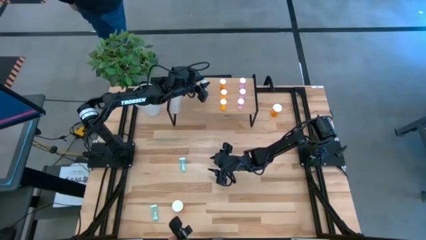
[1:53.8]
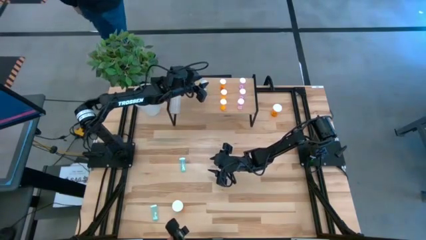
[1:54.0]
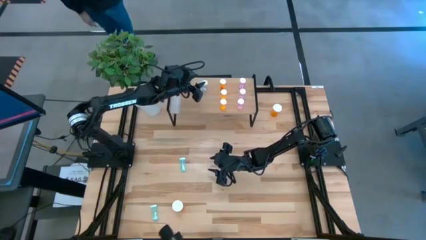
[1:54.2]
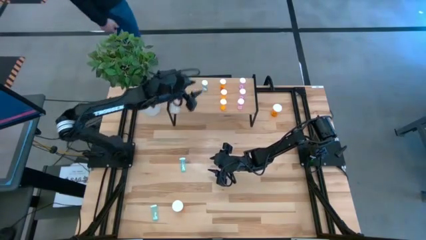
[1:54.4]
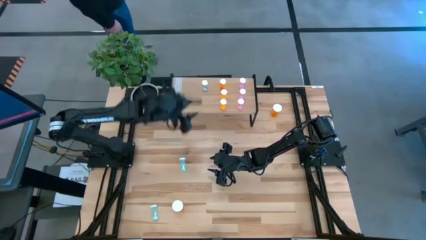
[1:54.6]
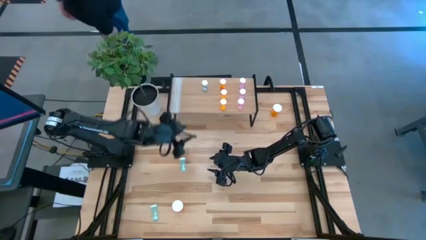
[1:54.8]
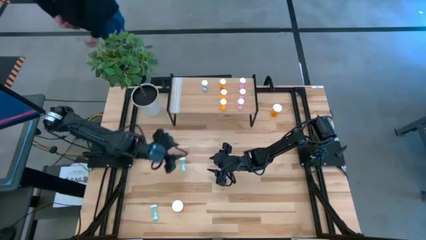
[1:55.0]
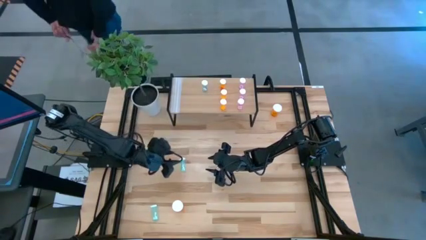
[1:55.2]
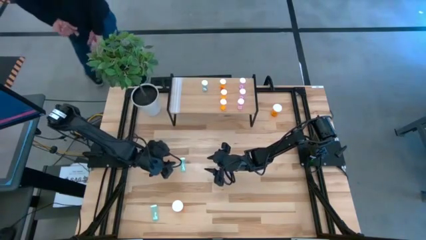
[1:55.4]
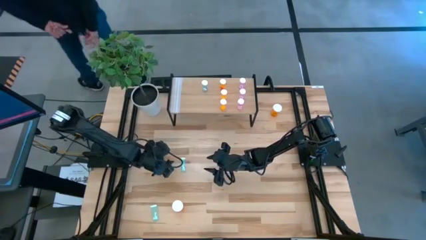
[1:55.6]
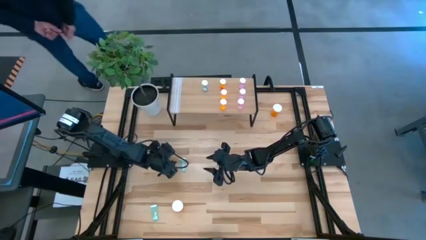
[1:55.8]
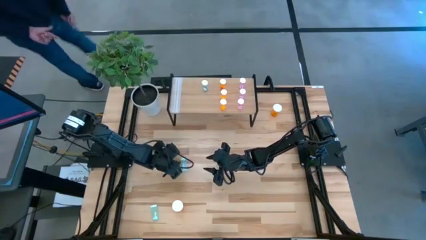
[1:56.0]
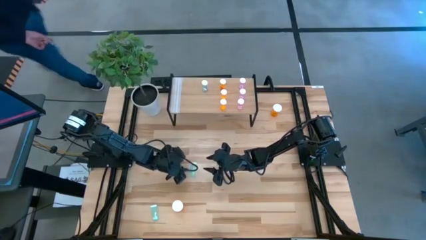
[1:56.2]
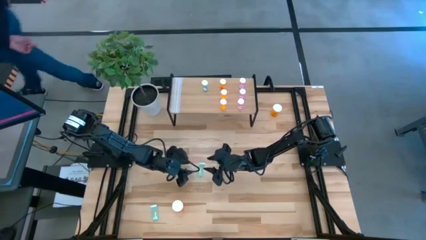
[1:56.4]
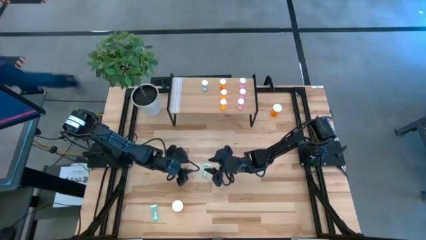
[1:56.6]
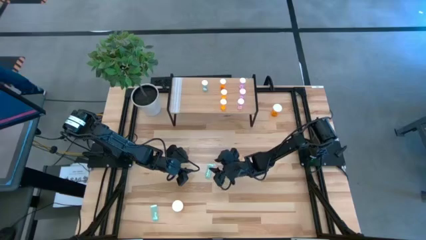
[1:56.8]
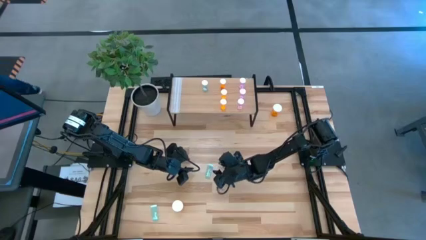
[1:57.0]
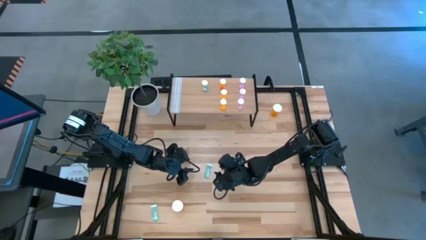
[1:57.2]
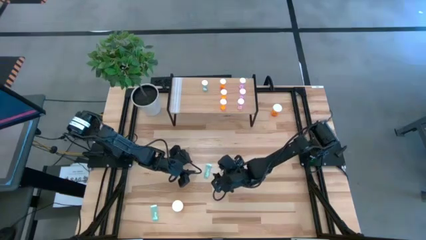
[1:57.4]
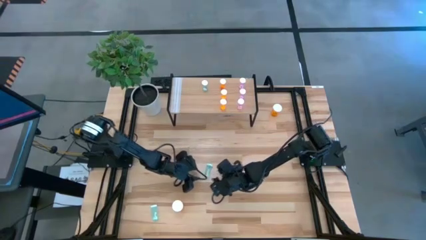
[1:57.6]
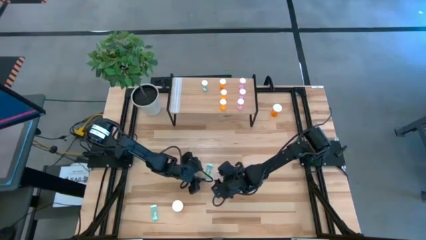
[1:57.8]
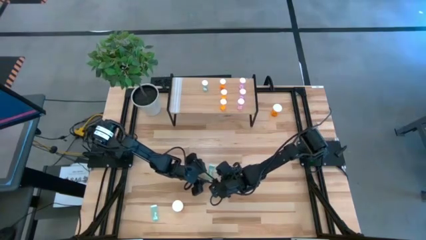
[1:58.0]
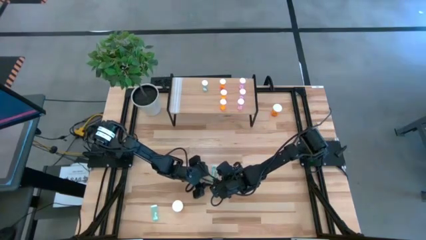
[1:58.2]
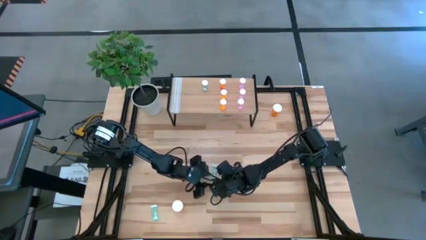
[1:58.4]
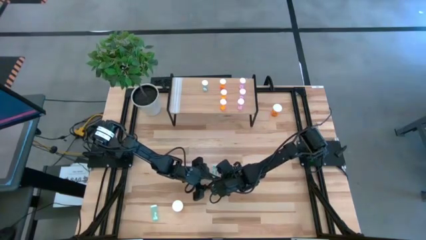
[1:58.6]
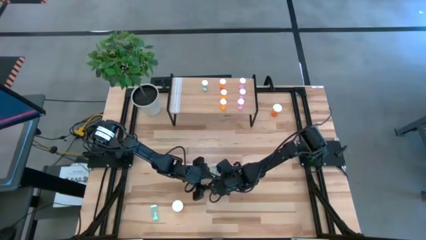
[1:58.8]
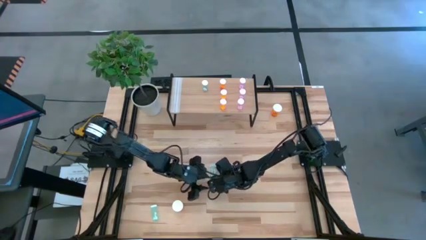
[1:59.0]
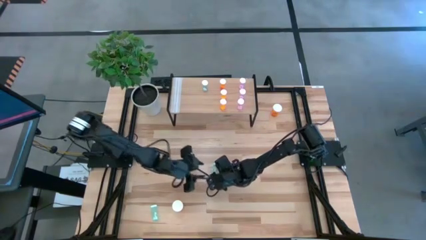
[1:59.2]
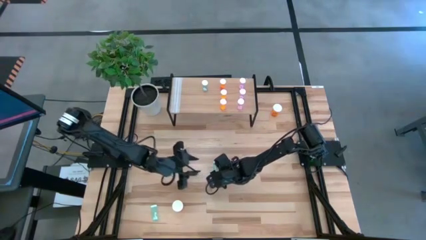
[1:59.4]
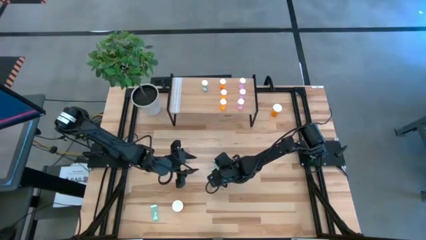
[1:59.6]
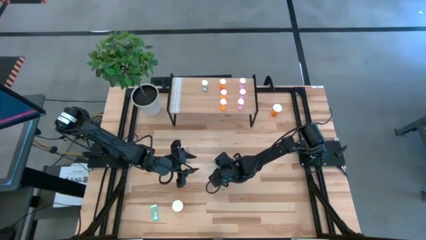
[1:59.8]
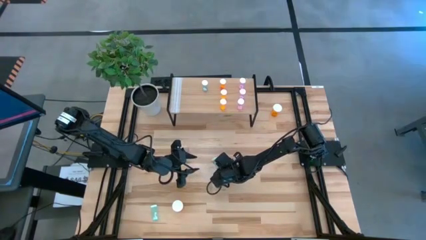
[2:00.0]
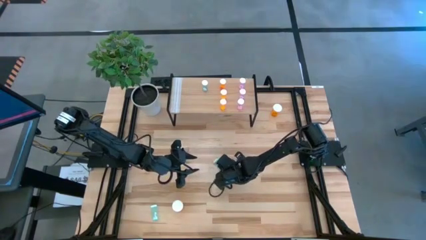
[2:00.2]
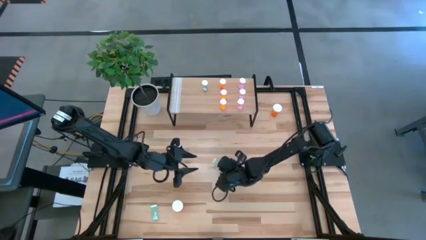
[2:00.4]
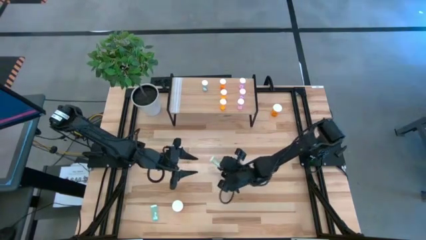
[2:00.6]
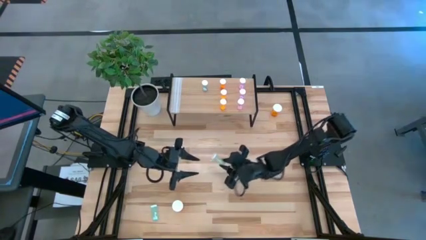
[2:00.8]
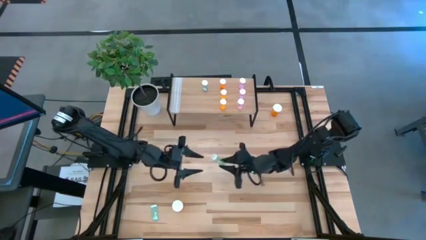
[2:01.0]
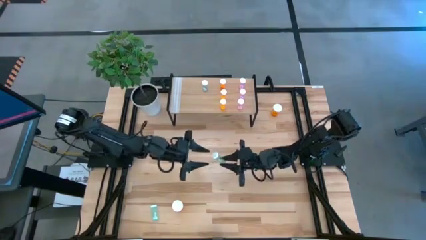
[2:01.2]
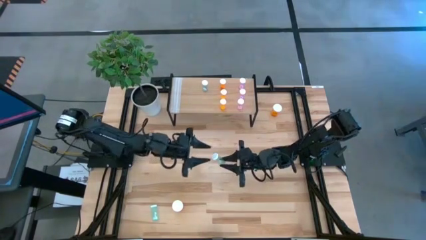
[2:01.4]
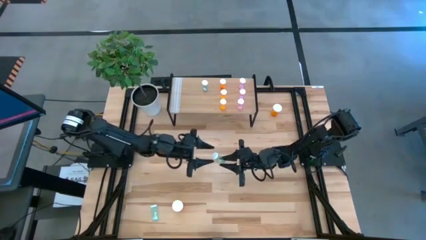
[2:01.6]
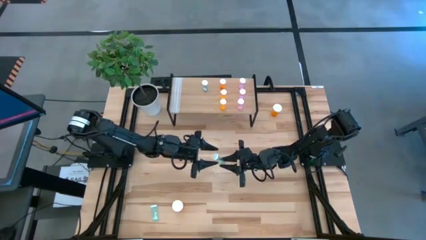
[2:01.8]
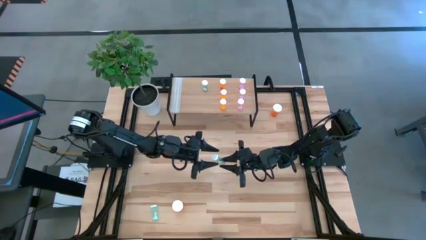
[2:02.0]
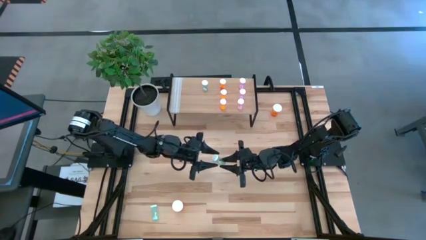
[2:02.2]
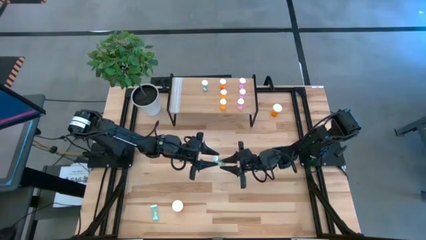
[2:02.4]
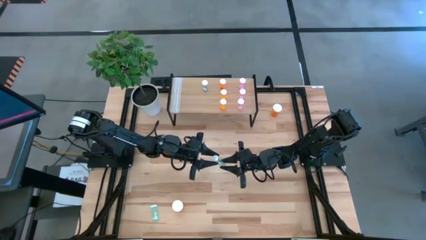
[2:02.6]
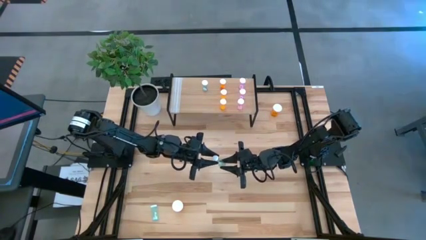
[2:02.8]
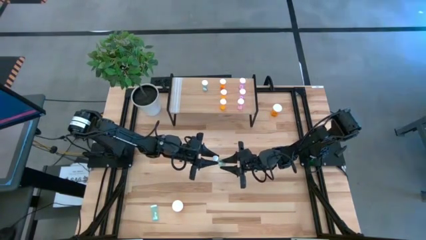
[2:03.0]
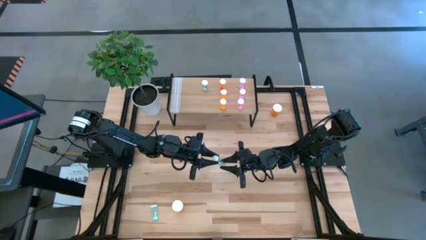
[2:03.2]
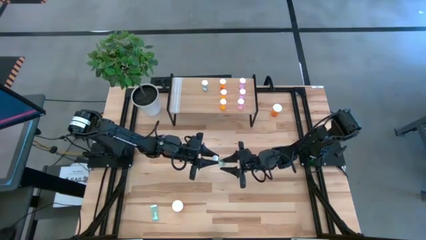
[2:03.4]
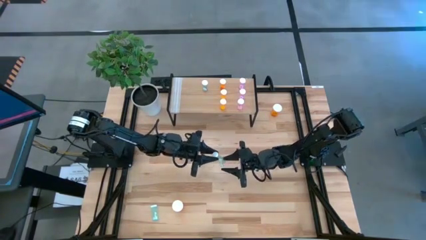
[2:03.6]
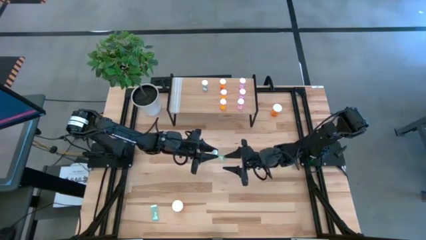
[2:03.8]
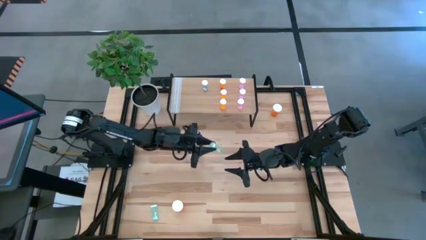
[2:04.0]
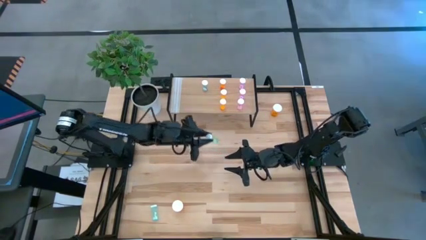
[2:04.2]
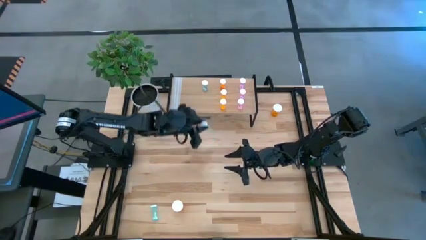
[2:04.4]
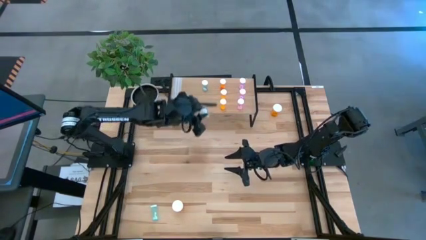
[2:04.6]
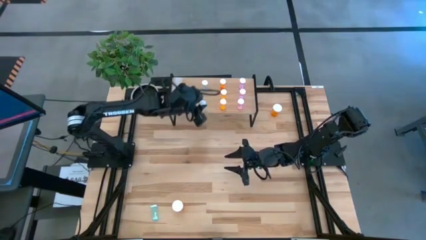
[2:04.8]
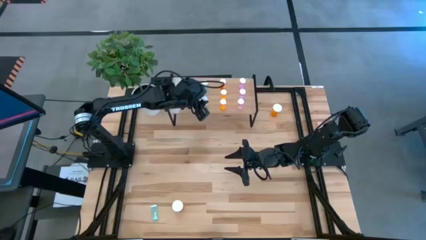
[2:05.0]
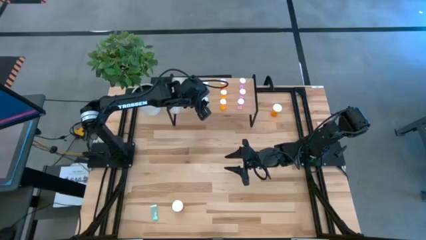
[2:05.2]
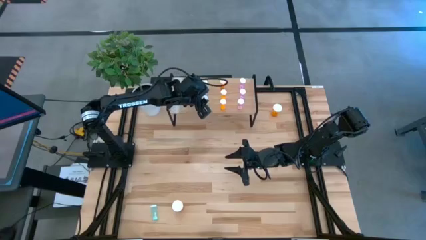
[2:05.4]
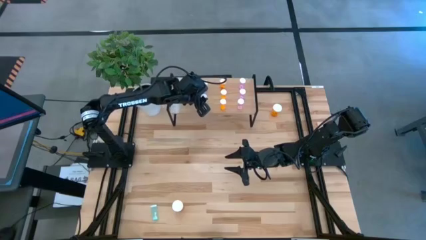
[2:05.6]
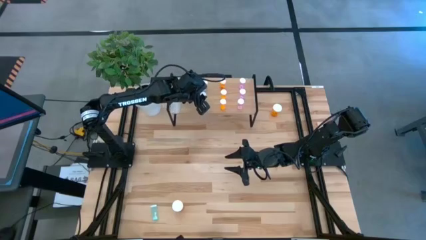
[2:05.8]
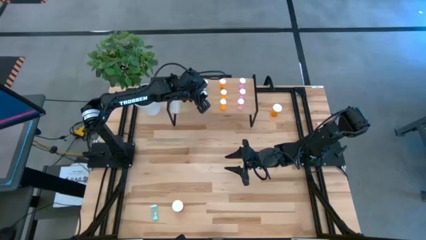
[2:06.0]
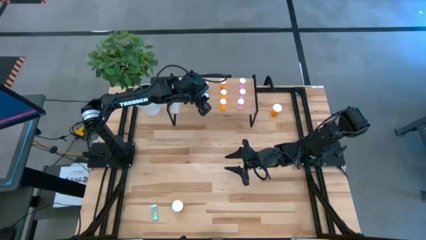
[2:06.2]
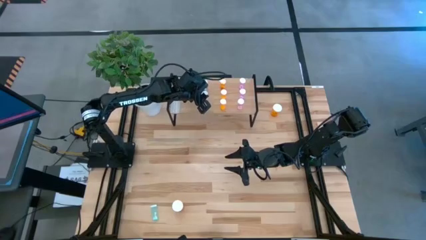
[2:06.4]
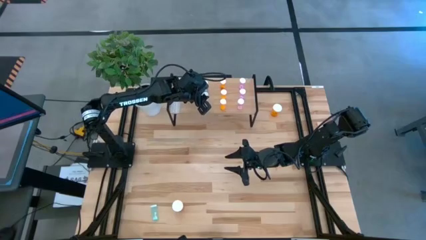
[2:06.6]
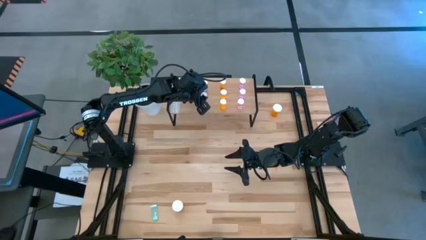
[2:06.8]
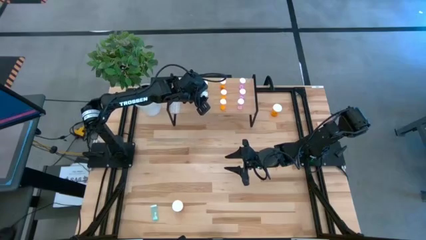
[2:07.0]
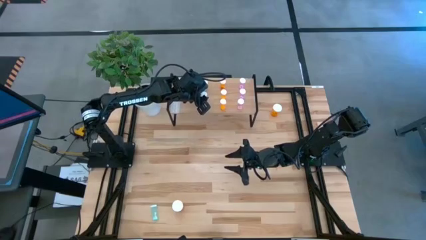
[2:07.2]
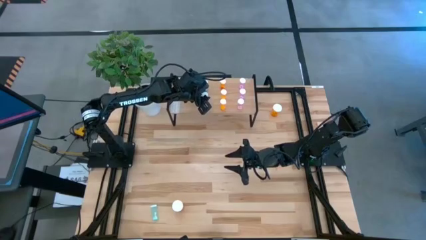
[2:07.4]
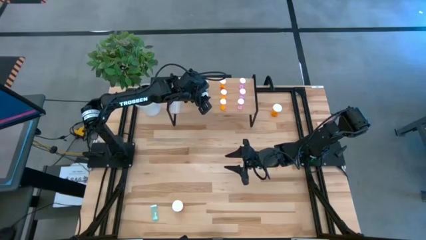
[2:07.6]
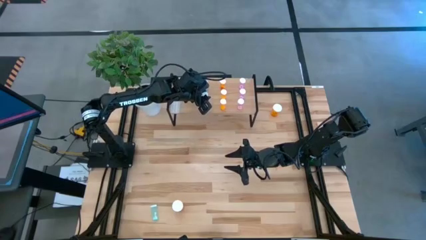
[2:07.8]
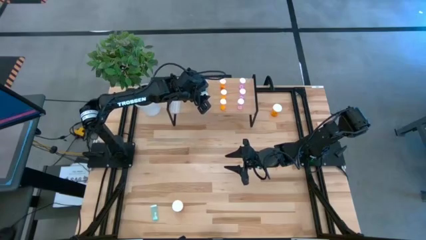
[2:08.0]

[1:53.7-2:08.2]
Task: Pick and place medicine bottles onto shelf by color
Put the top blue pill bottle on the shelf aligned with the other blue pill bottle

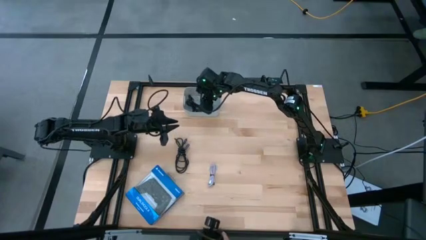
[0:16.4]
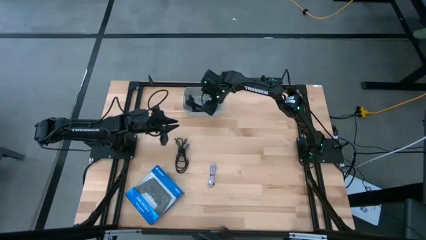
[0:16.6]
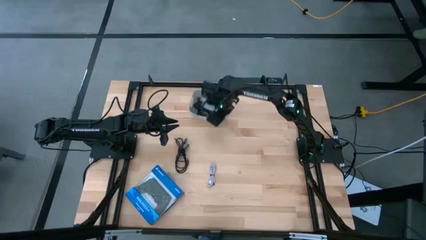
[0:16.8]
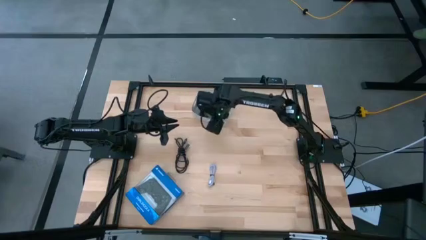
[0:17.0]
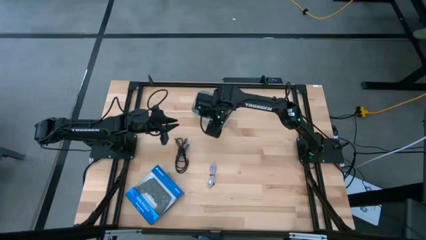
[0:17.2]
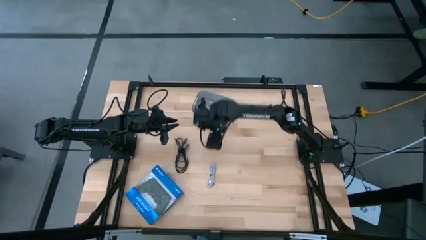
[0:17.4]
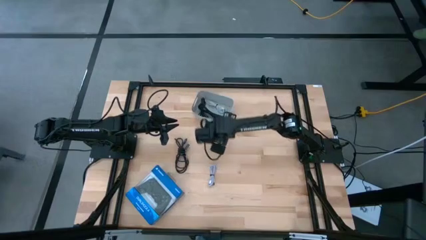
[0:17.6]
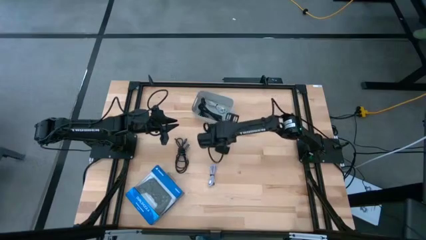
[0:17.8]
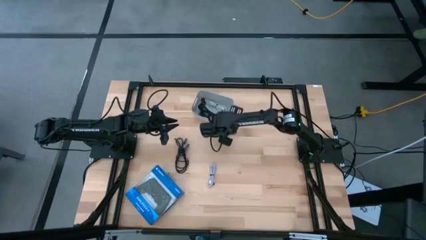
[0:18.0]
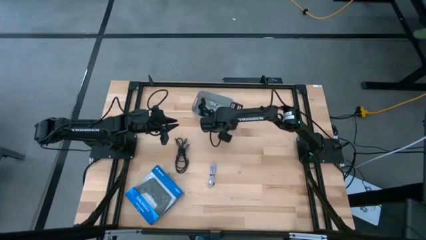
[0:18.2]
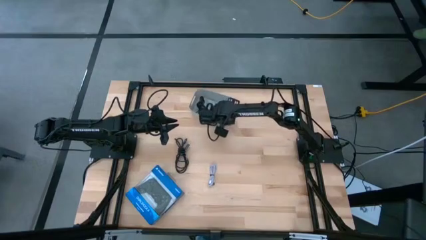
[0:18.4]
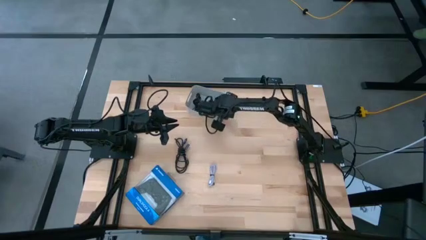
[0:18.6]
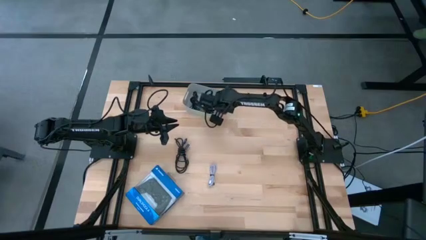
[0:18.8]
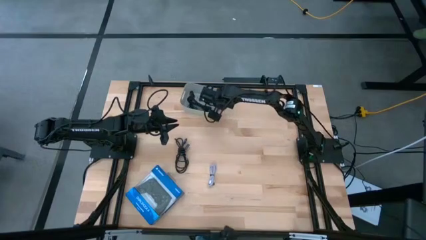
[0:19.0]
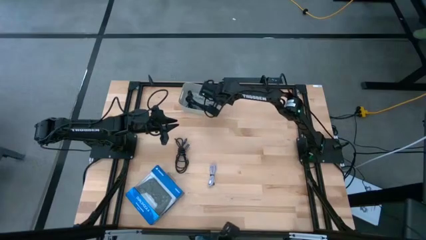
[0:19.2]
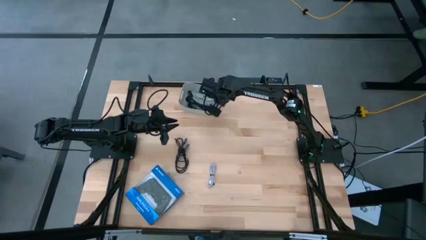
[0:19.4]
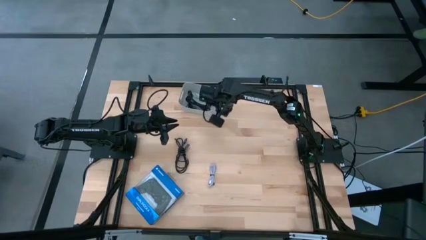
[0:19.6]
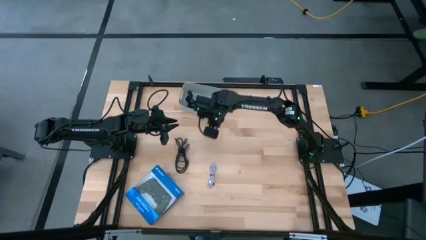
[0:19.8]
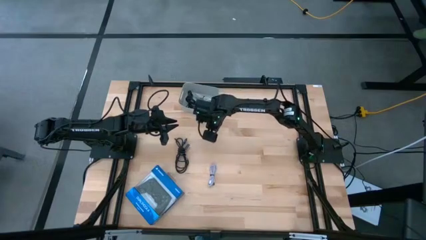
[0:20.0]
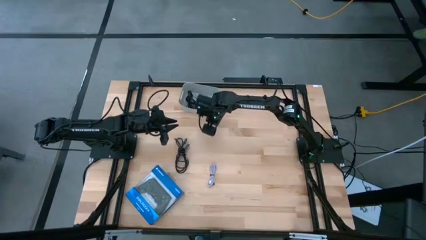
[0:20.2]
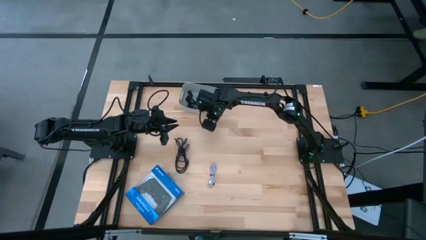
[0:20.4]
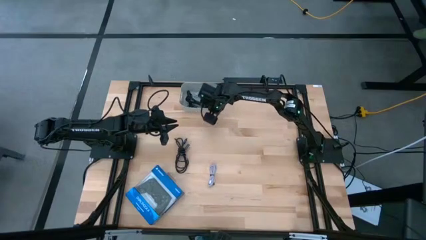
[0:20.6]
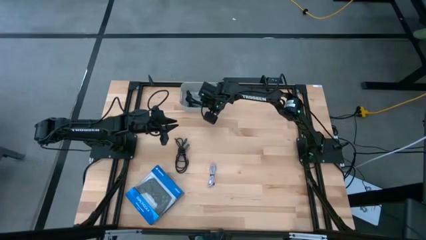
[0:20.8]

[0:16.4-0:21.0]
Task: Pick and place USB-C Cables
Adjust the white bin
